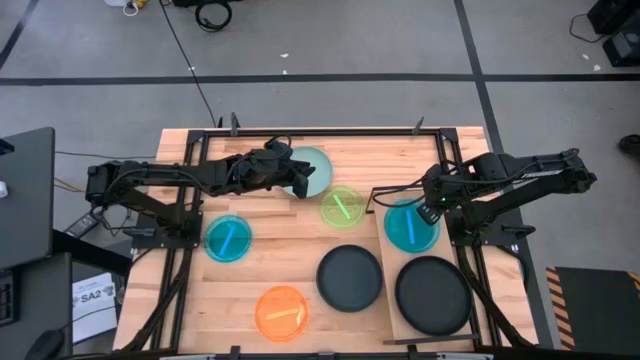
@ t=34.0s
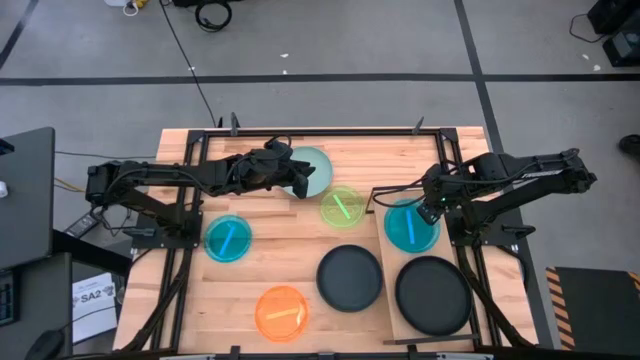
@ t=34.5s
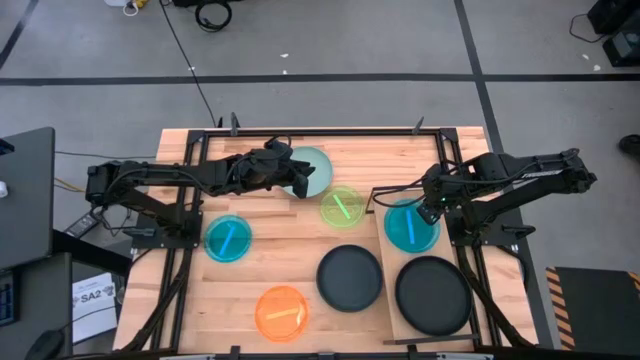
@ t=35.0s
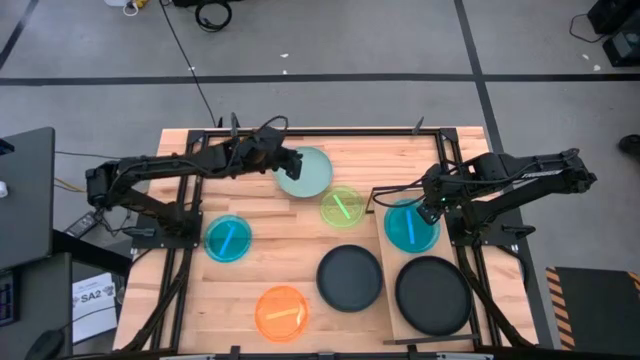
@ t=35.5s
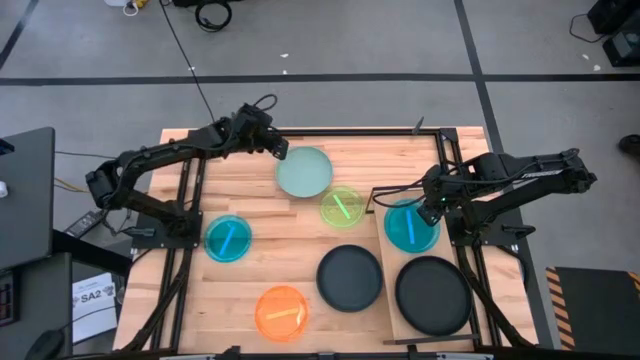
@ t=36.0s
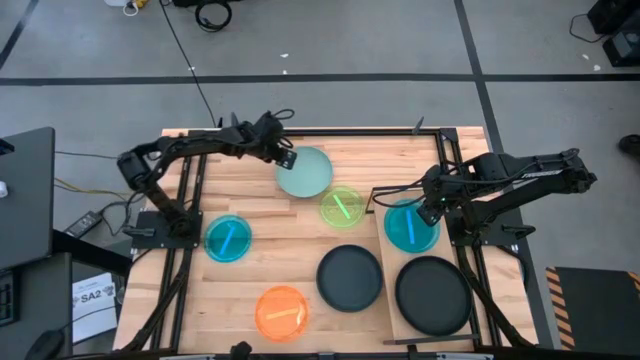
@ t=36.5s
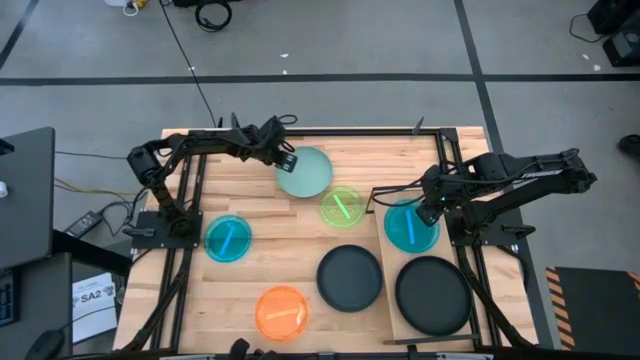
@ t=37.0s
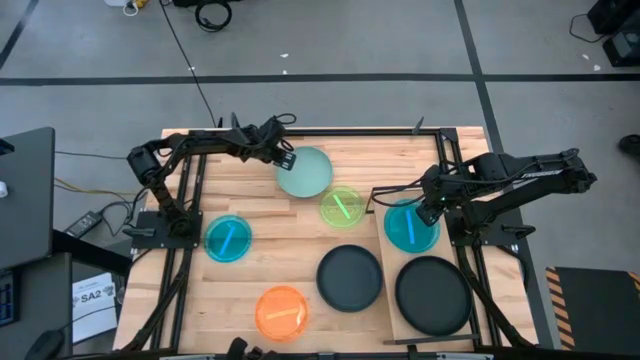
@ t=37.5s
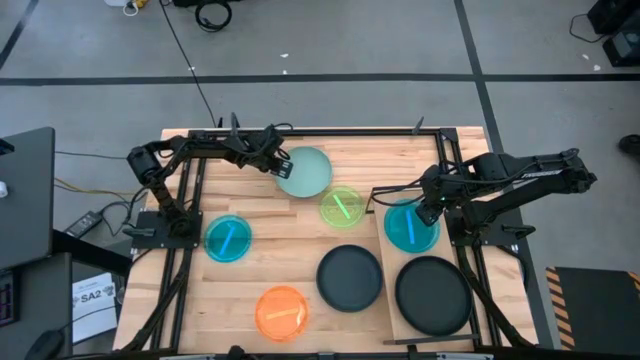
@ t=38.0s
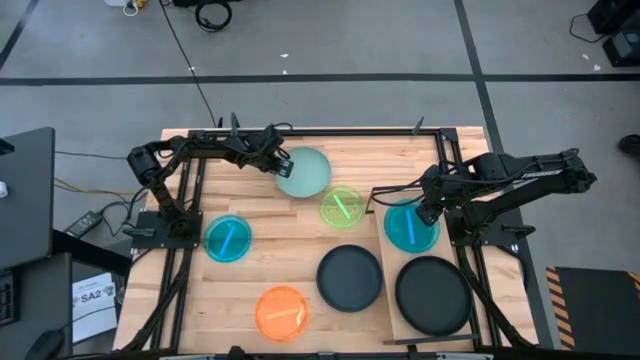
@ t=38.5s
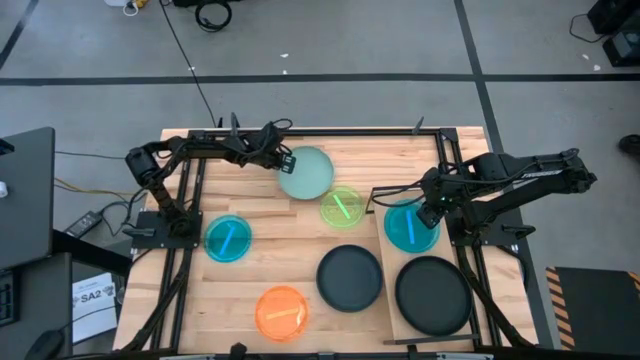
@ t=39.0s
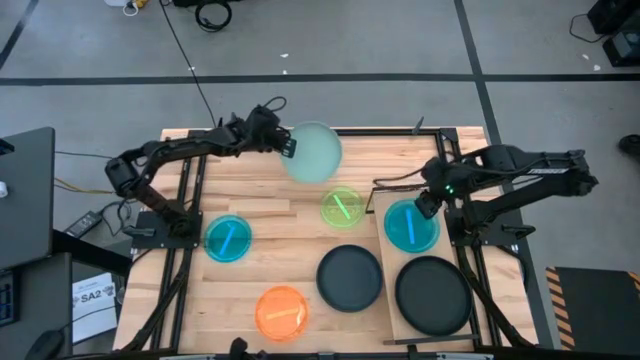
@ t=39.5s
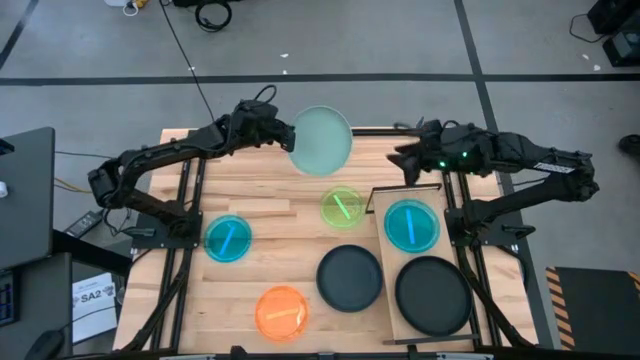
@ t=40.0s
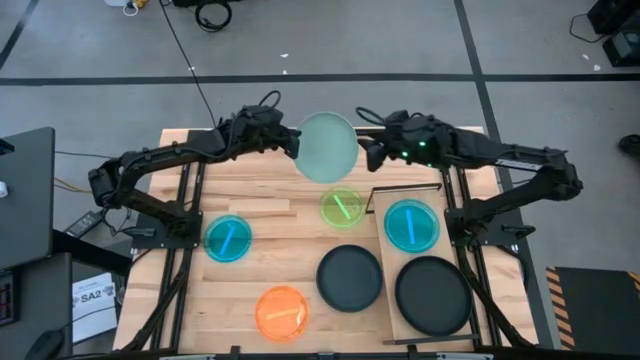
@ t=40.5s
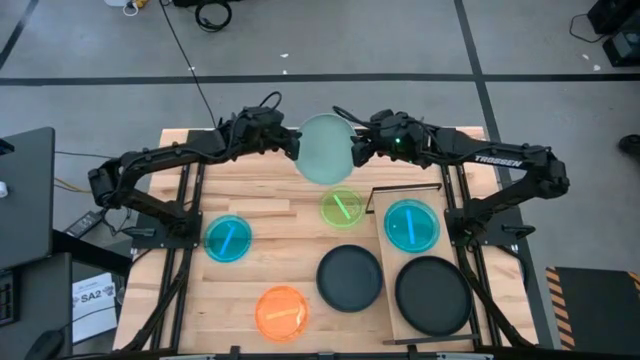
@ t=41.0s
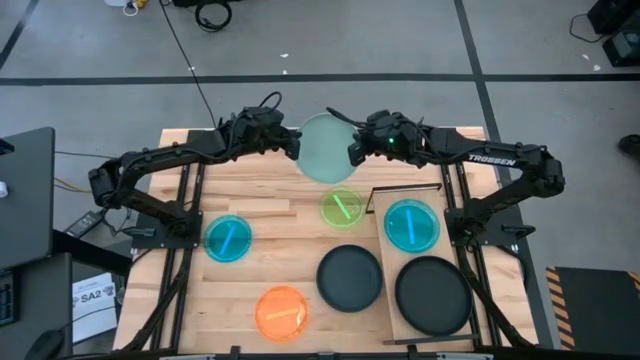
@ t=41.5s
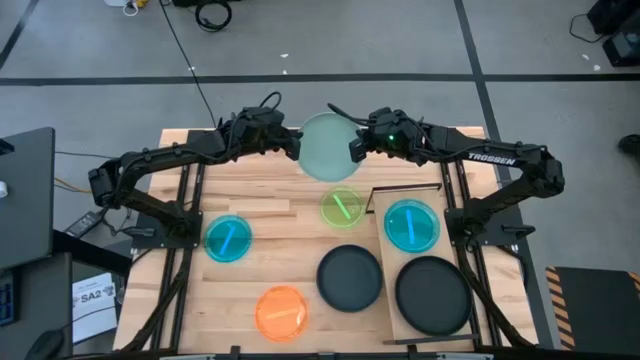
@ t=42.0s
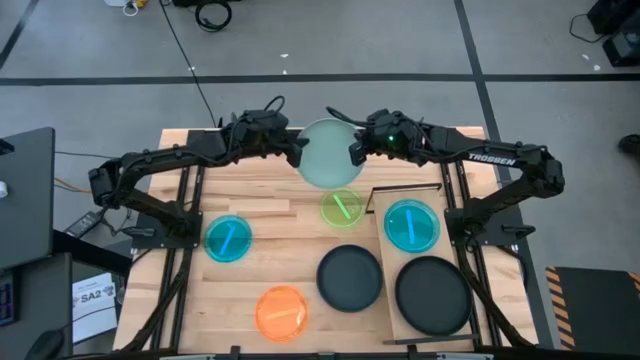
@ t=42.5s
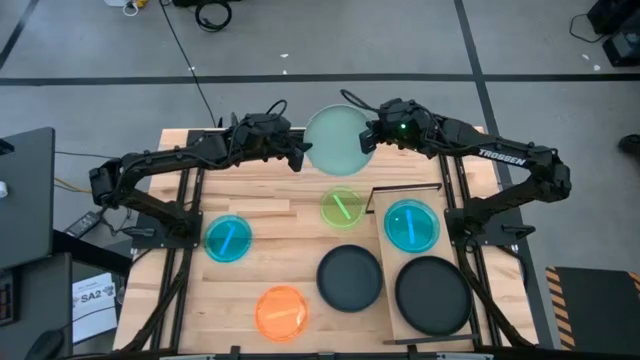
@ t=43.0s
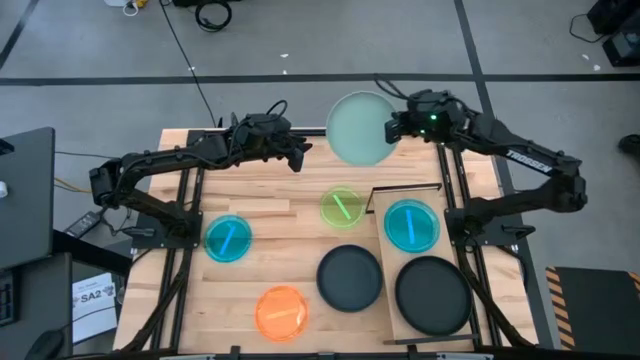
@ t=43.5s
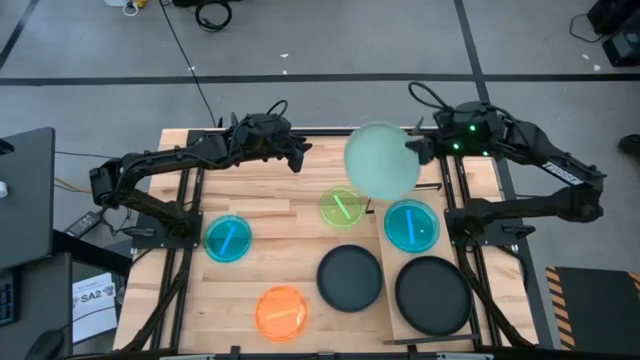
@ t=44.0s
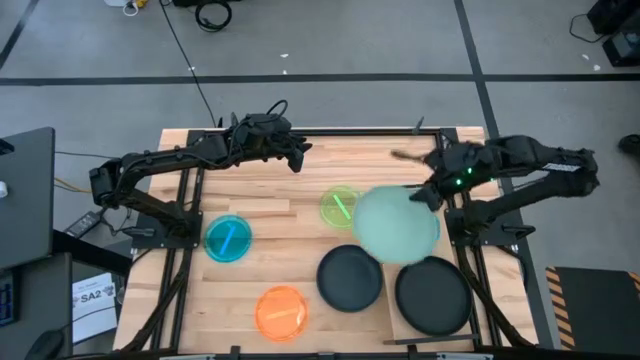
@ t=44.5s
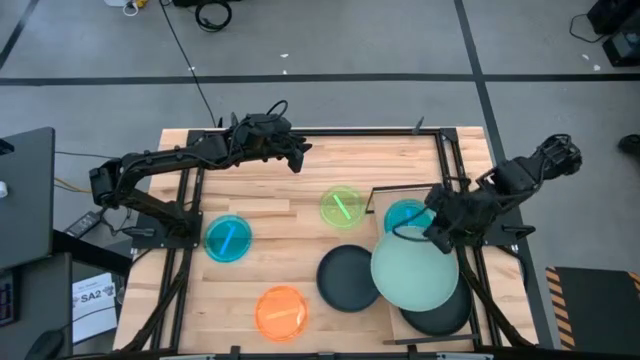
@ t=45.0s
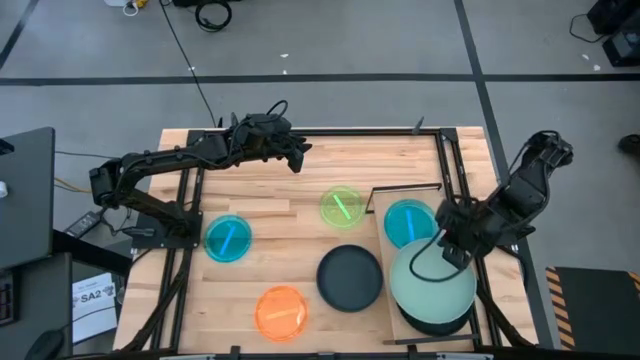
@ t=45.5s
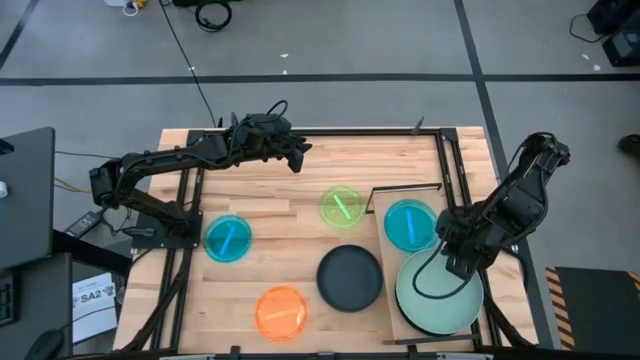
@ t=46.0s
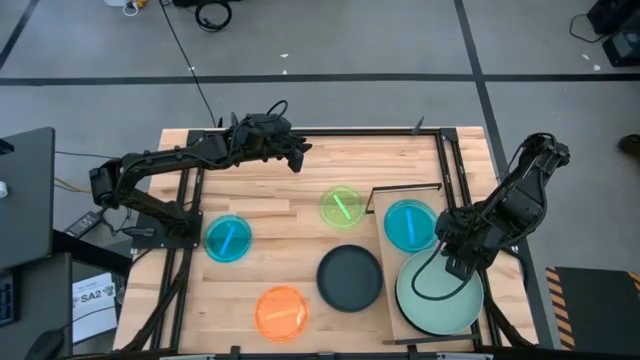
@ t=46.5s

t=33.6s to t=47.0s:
Task: Place and stack plates onto a shelf
Stack the gray plate on top of the black plate on the shelf

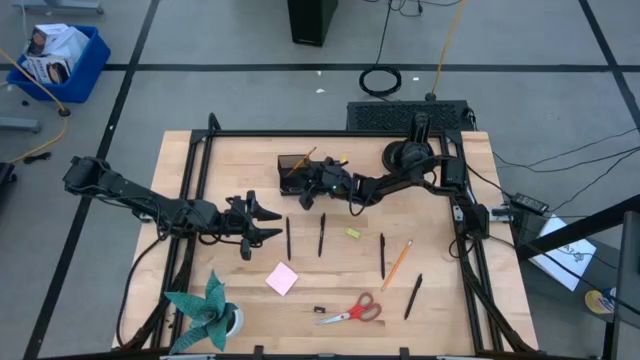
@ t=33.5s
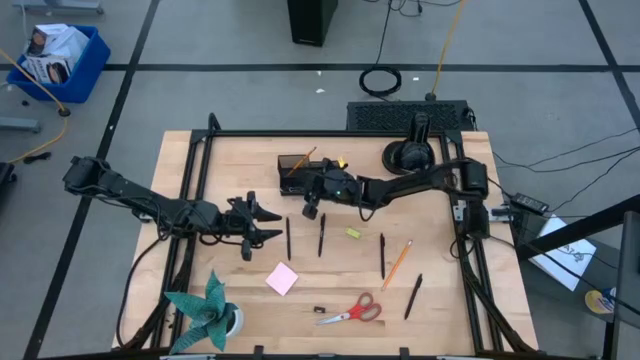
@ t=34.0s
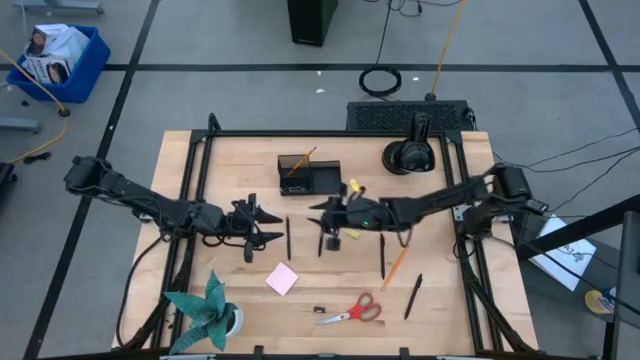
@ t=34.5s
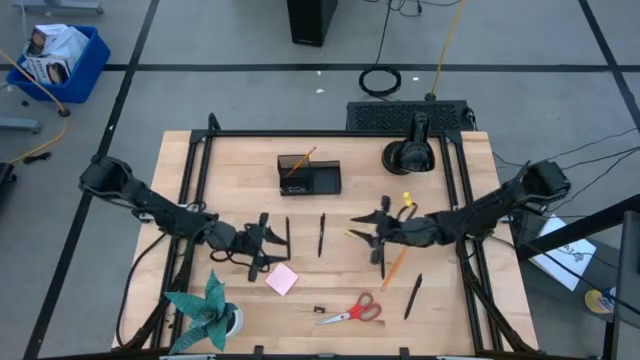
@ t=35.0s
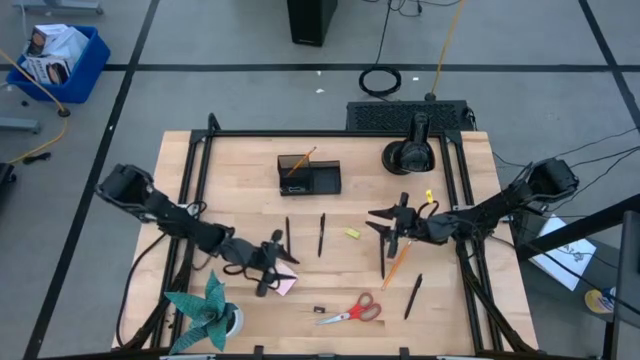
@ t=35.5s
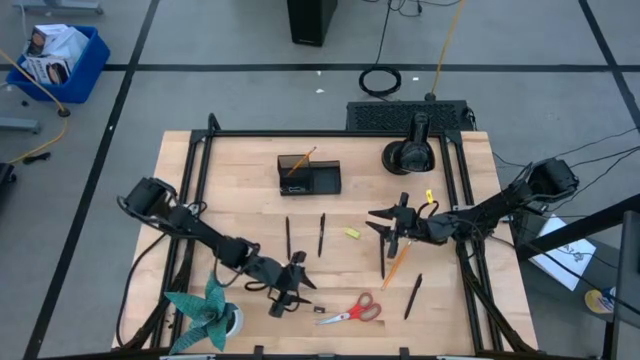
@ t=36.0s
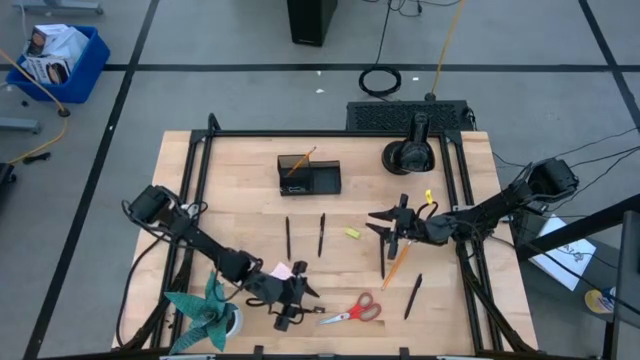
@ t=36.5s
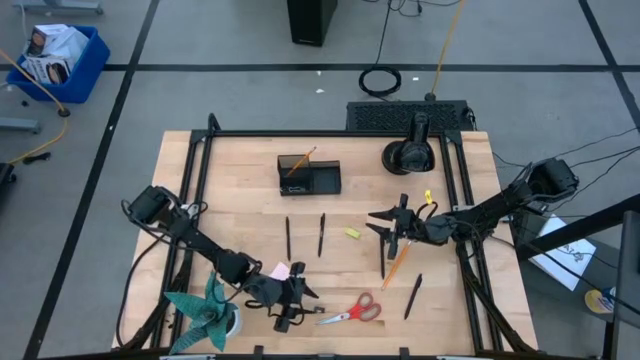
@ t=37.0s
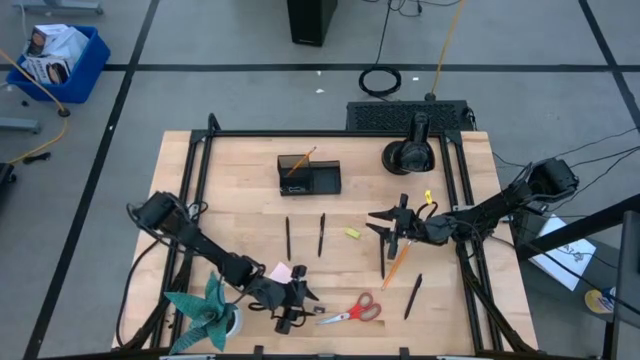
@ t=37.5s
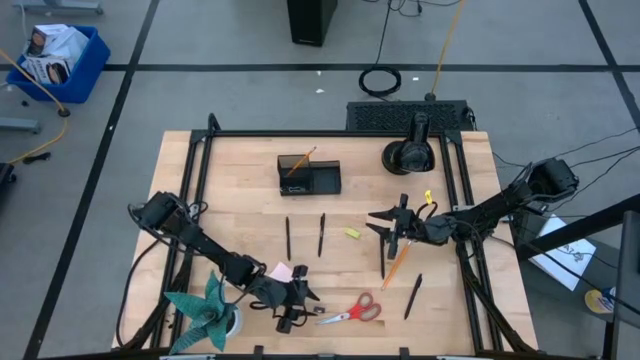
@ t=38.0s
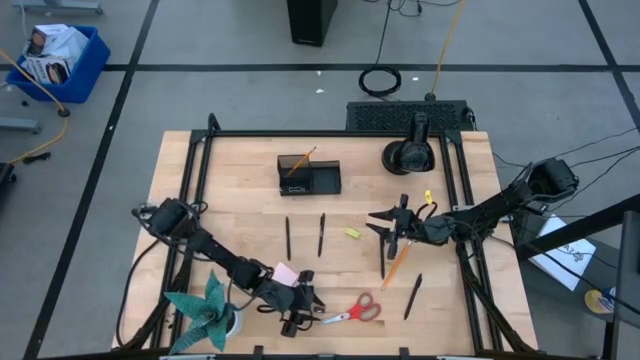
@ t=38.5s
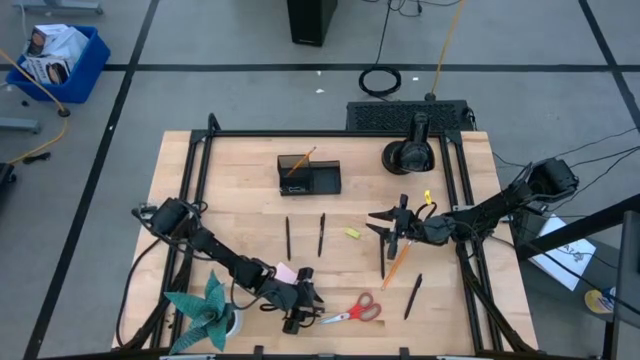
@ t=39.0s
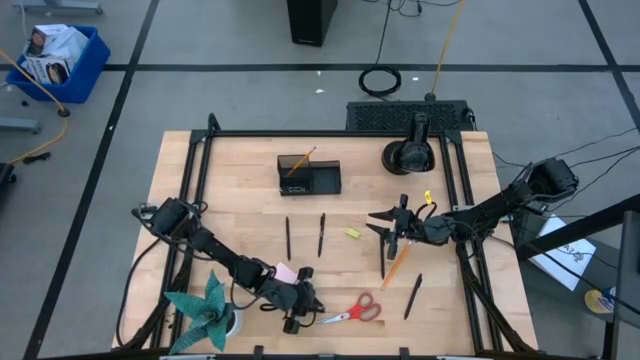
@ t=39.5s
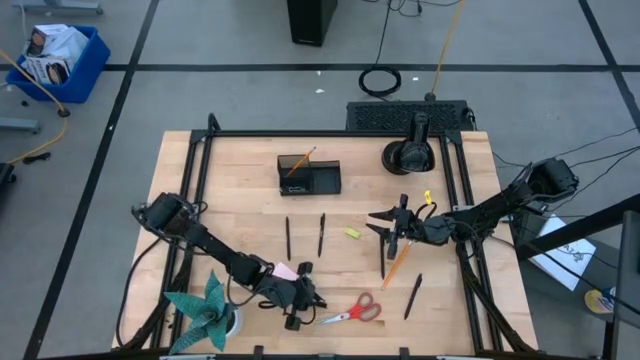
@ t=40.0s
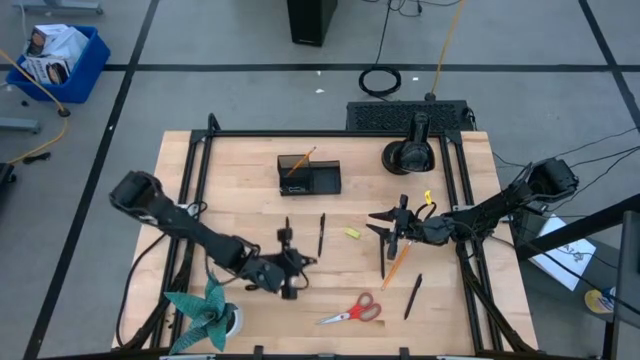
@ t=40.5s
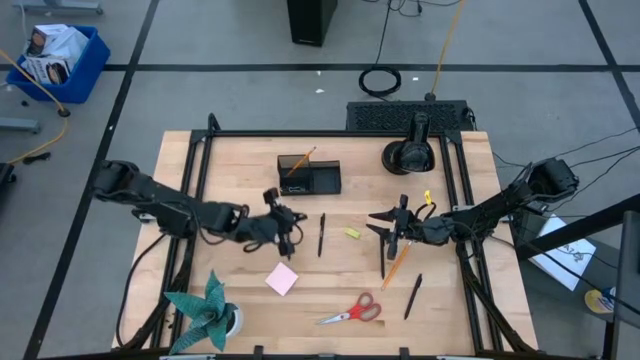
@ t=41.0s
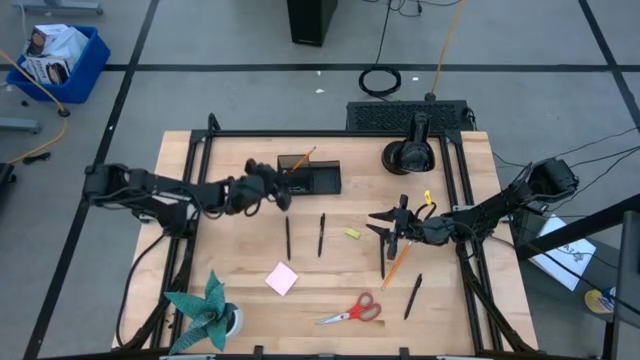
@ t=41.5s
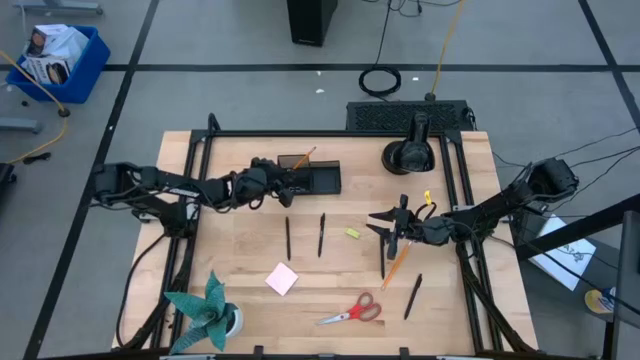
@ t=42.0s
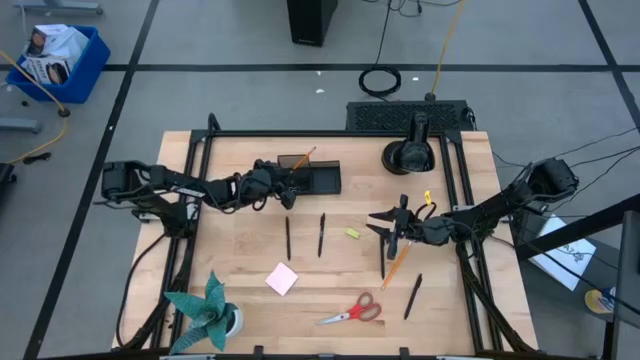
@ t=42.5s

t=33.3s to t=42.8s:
Task: Pick and place office supplies into organizer
Put the black binder clip into the black desk organizer
